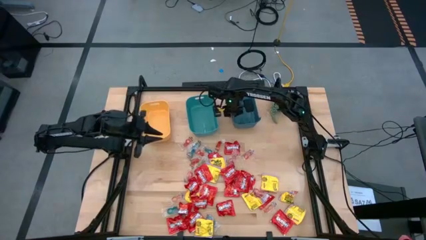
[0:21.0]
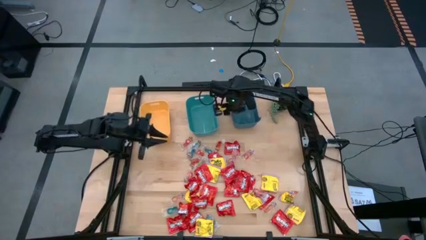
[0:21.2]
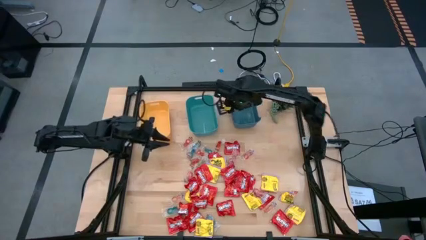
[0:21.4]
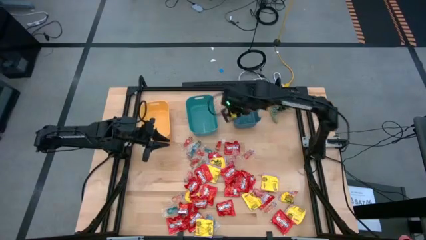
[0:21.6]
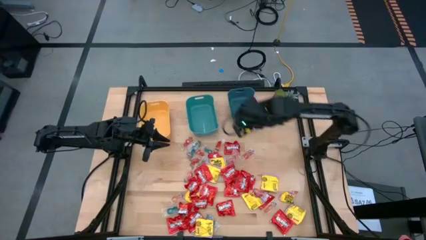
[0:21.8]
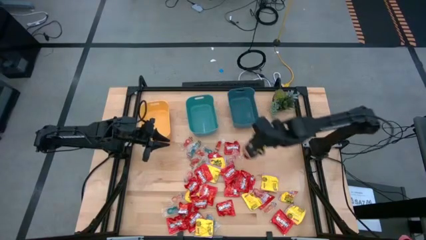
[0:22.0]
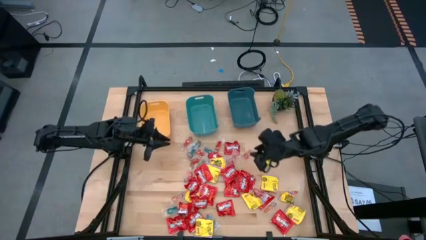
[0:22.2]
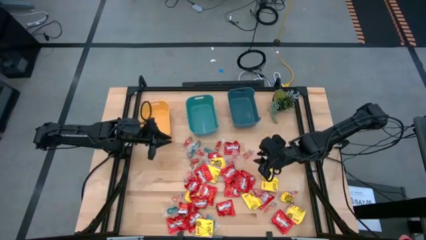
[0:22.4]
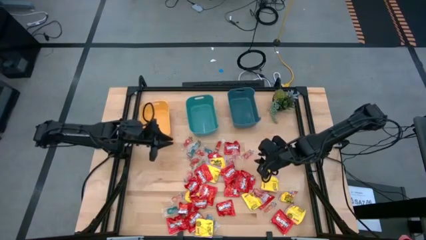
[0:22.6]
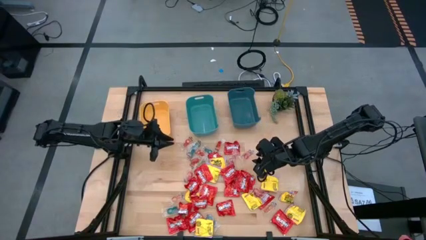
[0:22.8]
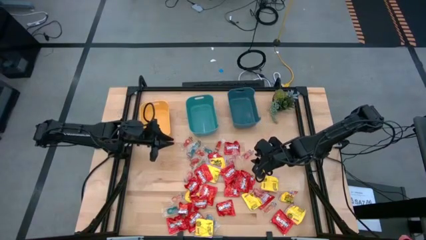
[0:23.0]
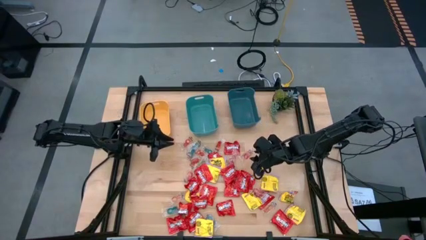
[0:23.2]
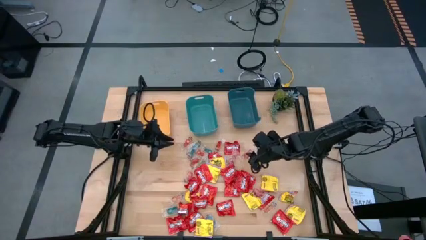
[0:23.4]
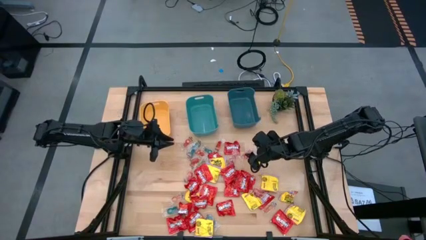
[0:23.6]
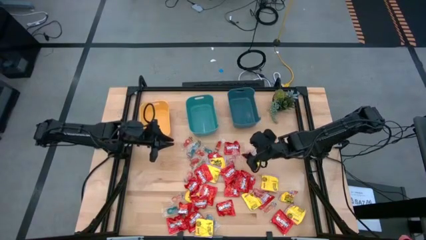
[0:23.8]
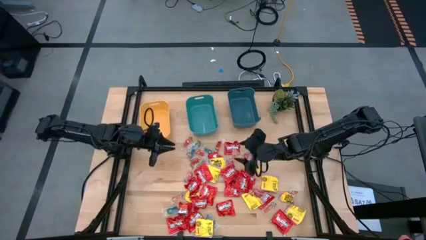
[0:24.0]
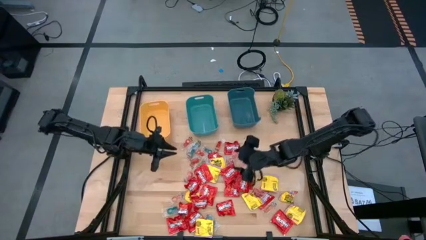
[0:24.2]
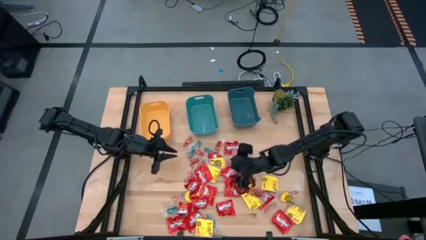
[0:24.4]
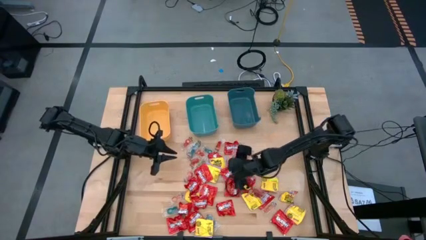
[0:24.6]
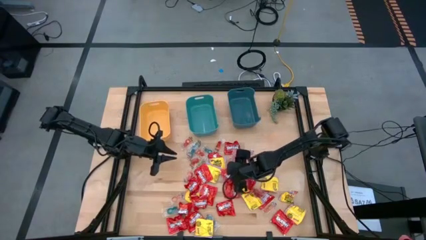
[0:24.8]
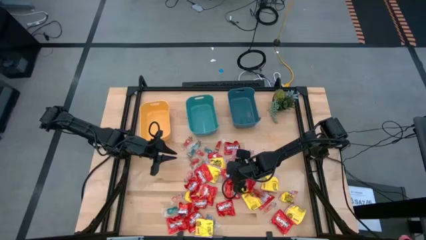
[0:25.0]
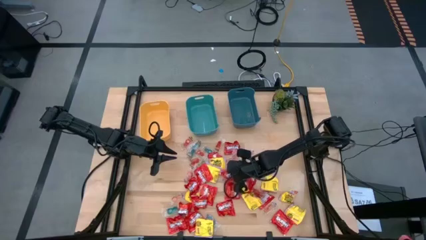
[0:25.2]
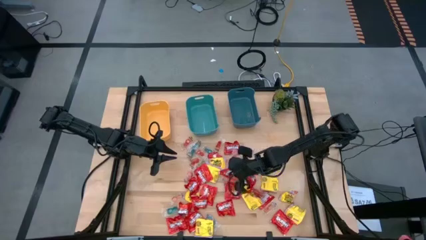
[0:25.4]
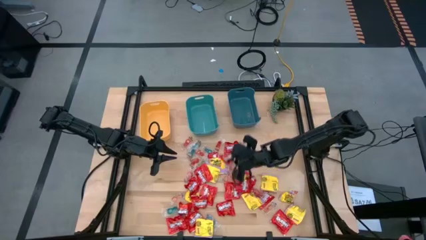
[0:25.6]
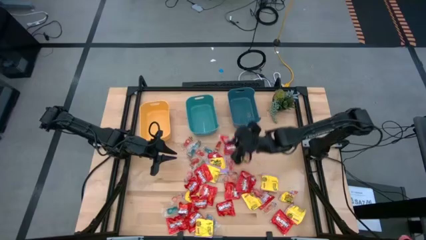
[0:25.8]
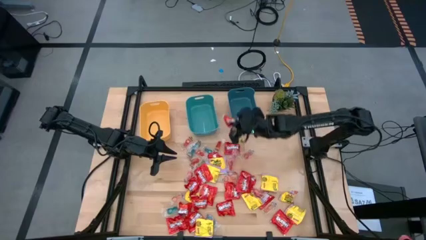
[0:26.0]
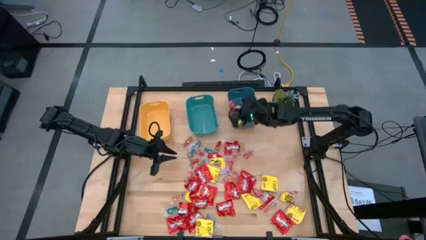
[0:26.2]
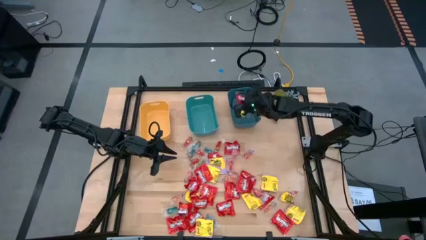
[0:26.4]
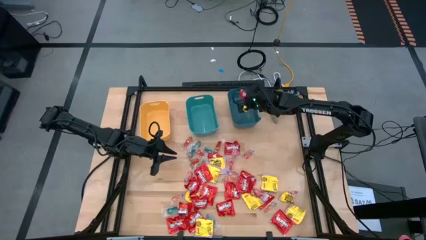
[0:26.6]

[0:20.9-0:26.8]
Task: Sort candy
Put the red candy pack into the blue bin

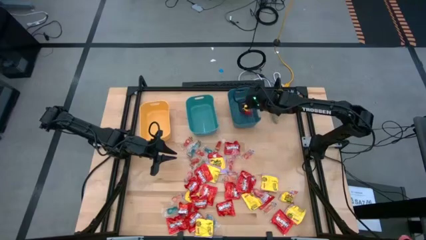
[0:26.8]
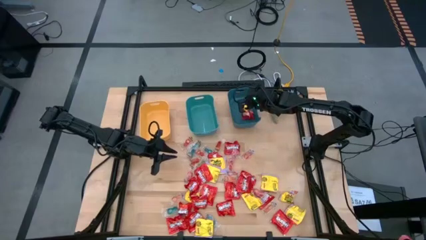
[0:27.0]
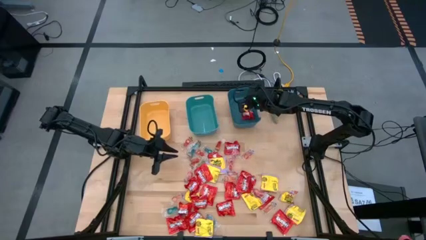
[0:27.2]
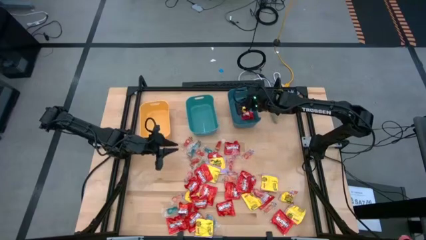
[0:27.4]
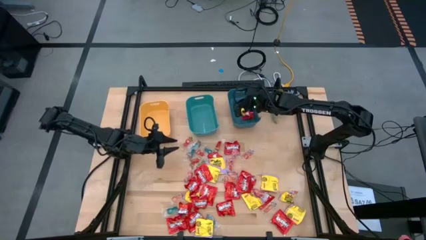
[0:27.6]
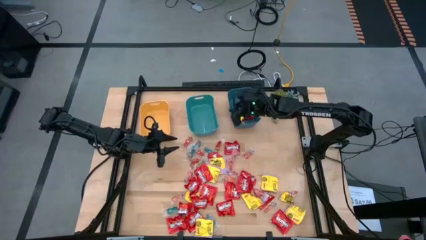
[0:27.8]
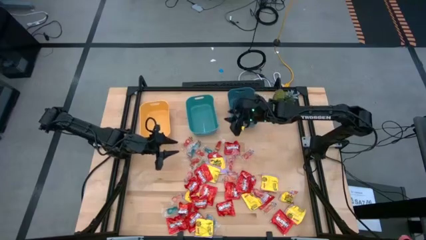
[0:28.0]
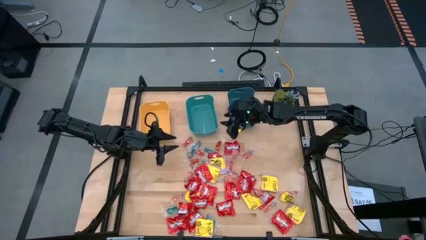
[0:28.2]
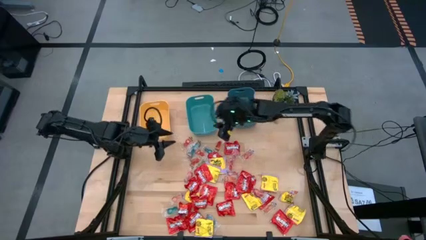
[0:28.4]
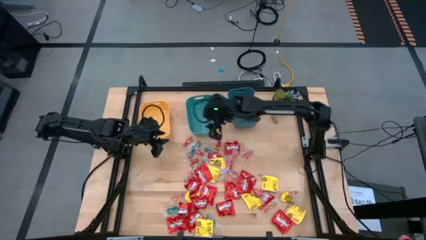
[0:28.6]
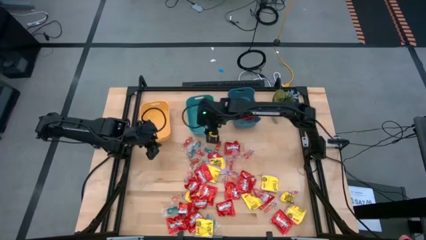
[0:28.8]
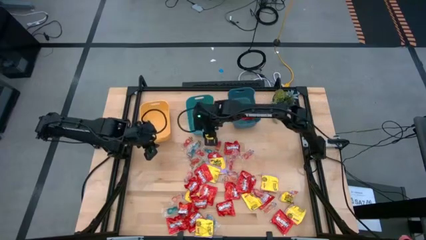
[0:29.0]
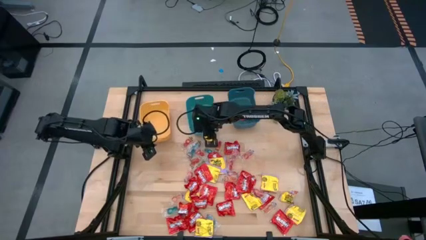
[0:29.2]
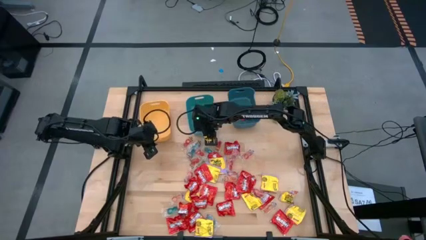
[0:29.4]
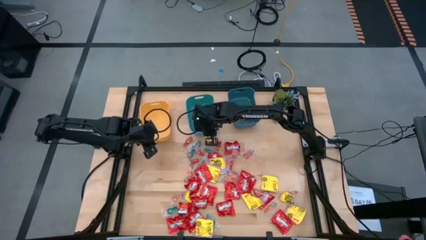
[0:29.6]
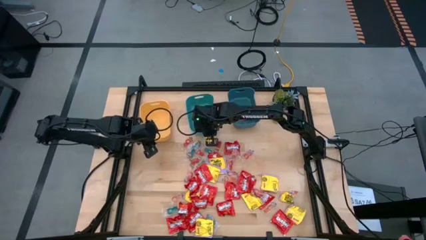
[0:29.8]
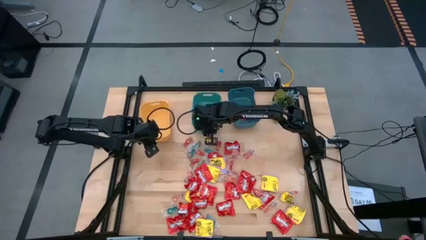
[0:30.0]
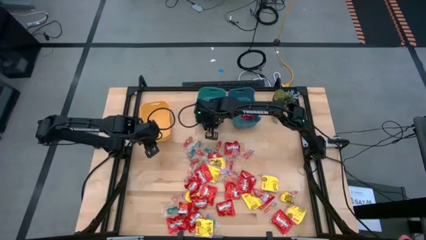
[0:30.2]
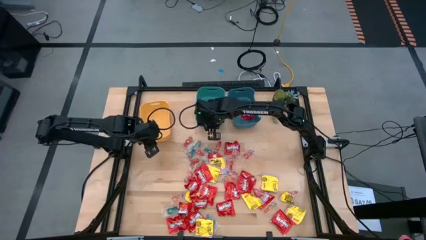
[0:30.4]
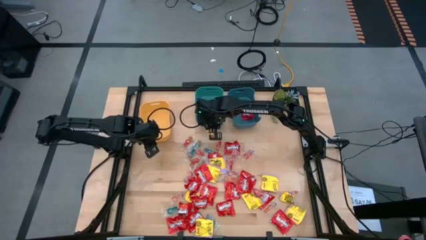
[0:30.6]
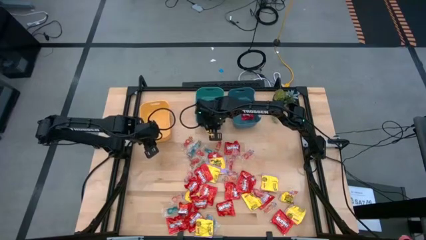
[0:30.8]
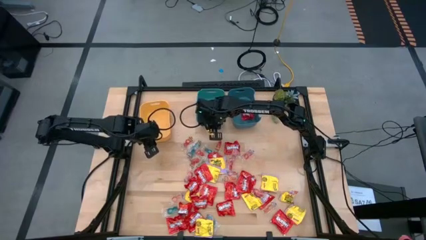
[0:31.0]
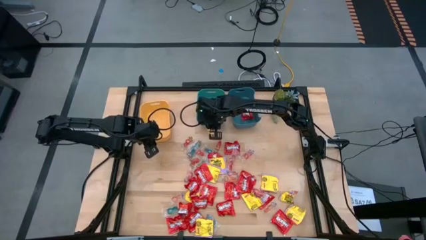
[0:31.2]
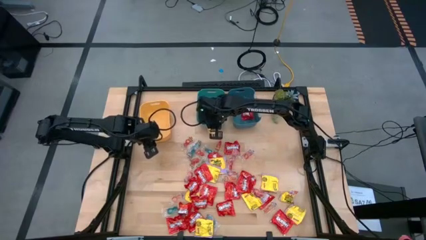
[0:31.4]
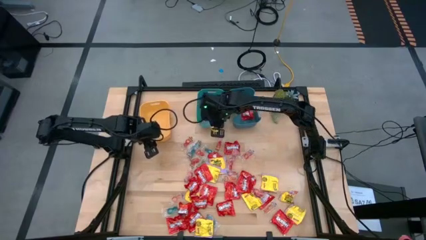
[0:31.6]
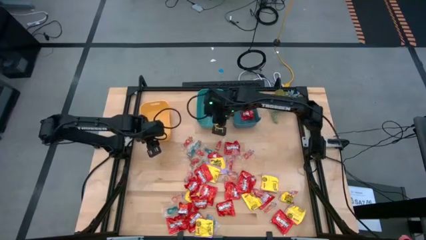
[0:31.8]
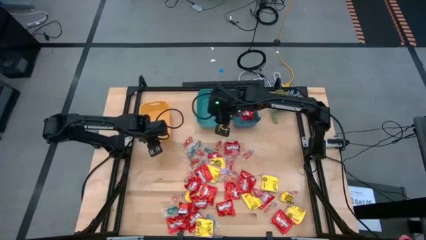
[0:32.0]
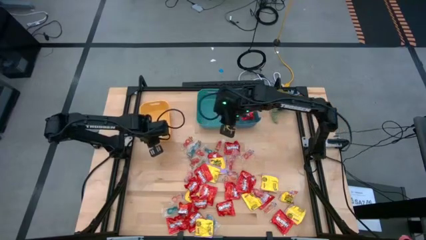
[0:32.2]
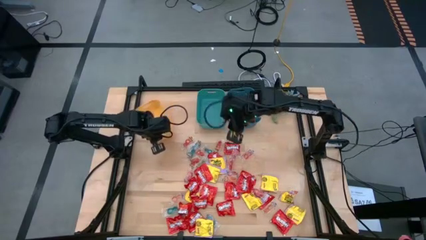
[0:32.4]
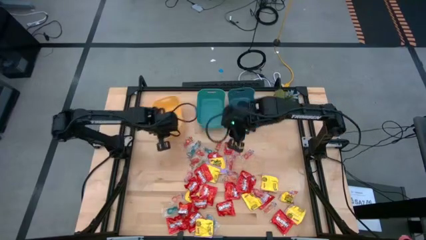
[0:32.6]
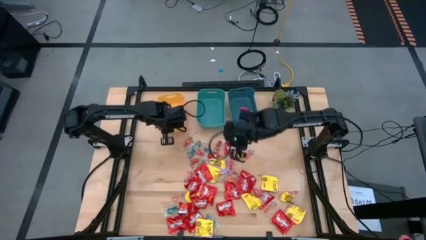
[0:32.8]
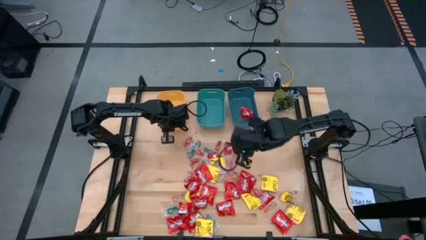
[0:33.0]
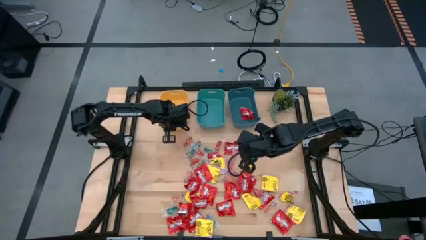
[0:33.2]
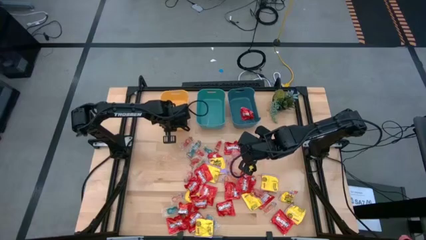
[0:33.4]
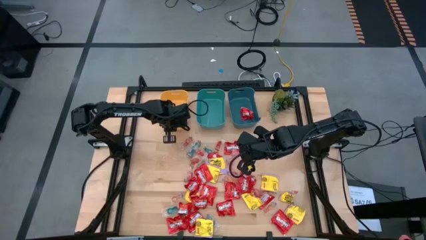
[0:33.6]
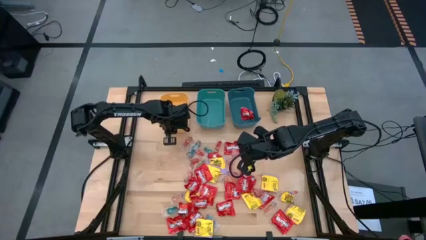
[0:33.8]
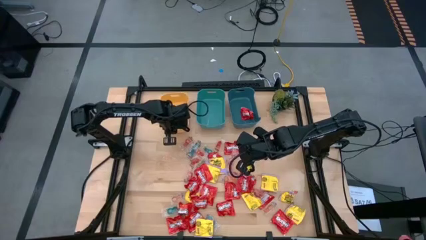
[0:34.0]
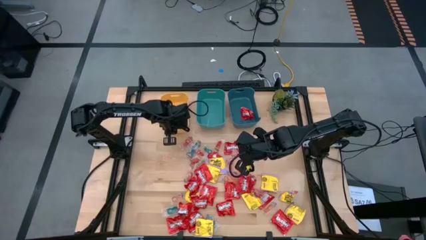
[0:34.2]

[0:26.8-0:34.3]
Adjust the green and yellow bins

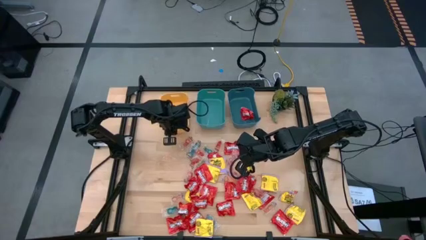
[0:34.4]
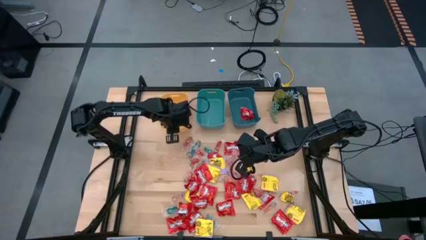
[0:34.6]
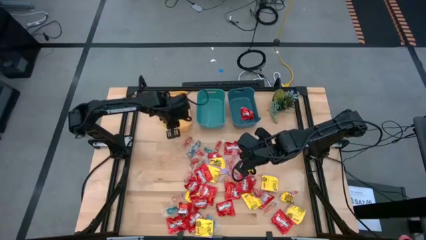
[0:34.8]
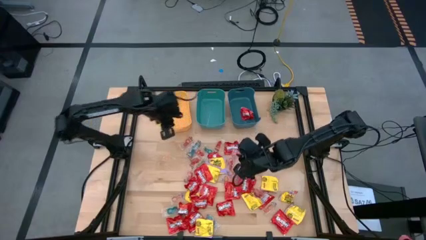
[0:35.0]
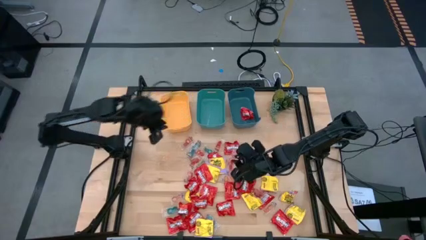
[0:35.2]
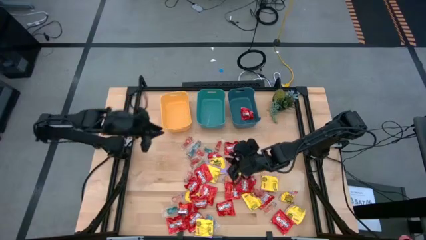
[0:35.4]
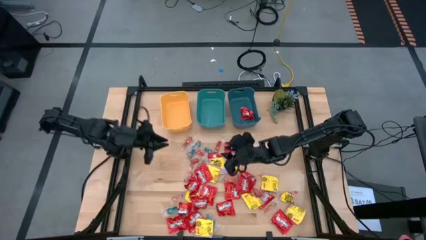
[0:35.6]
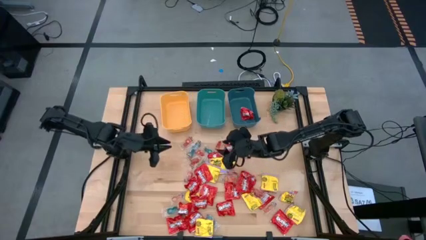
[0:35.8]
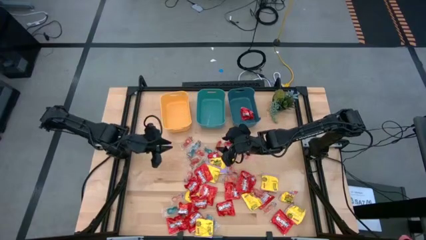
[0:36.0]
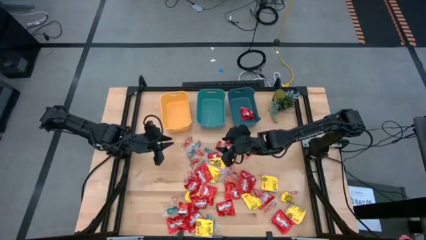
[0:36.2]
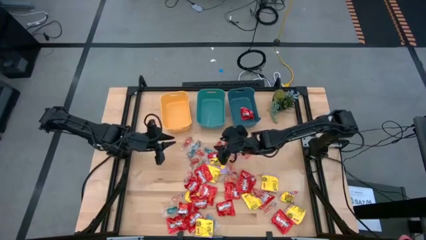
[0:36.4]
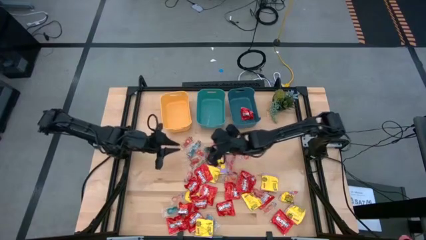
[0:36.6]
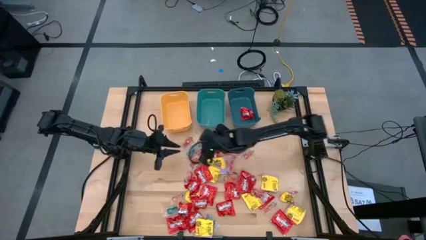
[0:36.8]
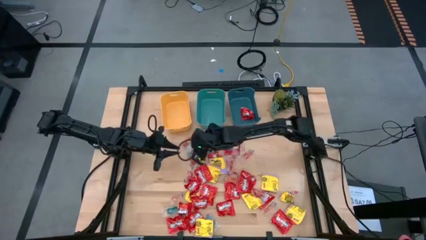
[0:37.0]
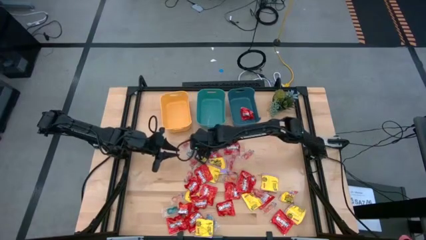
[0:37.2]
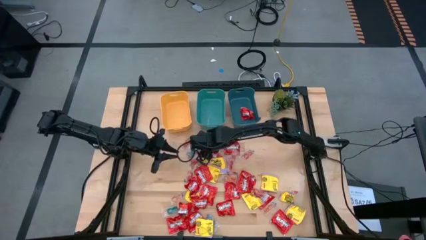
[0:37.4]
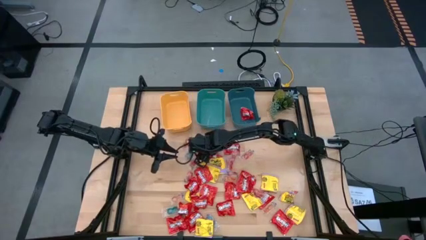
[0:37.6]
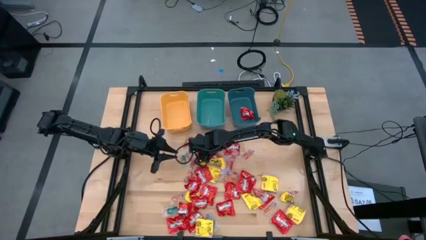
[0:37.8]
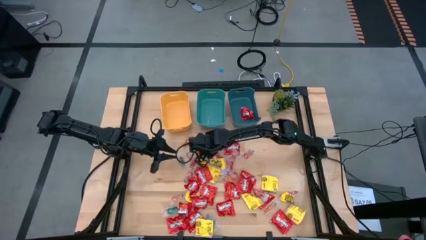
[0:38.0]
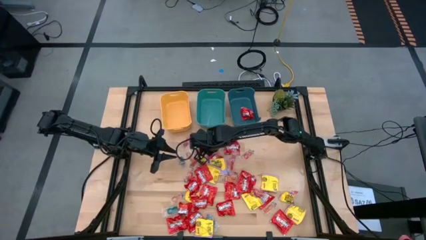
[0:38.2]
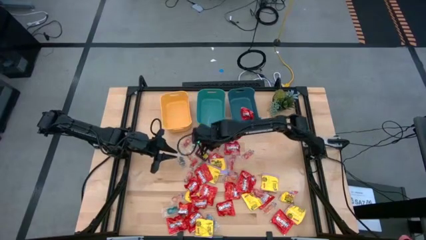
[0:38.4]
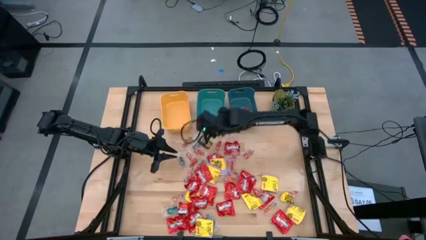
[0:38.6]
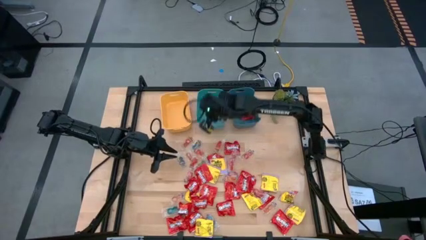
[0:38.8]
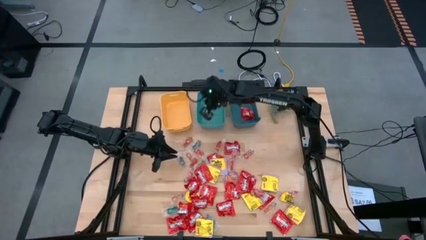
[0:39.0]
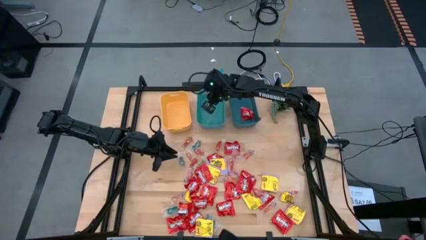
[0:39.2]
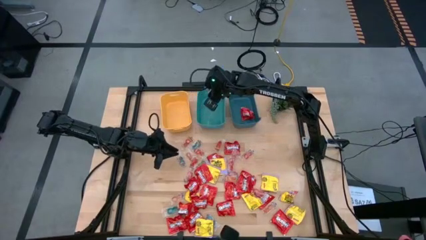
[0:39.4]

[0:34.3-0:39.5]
Put the blue gummy candy into the green bin
